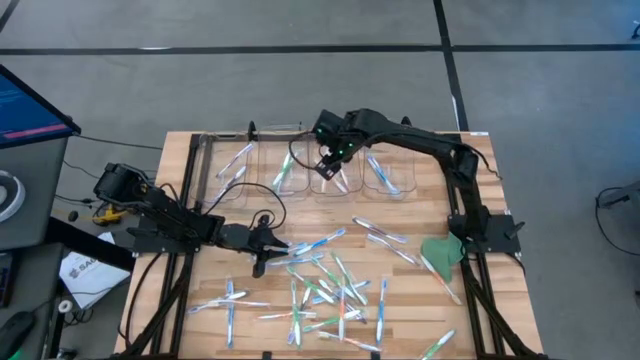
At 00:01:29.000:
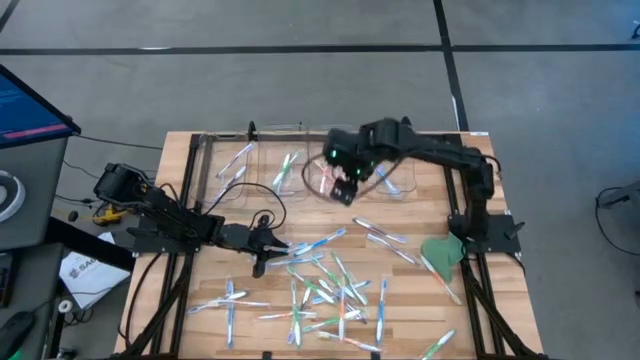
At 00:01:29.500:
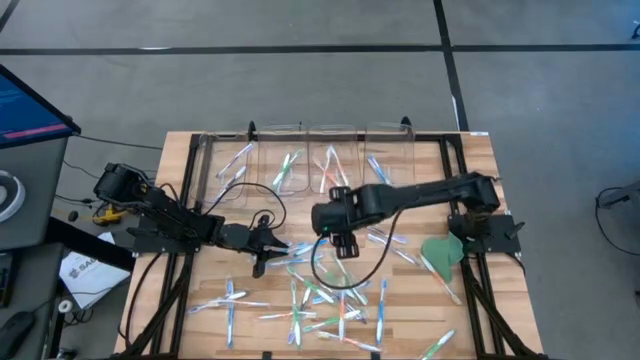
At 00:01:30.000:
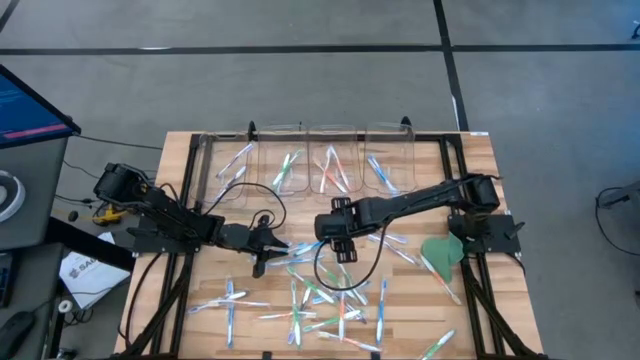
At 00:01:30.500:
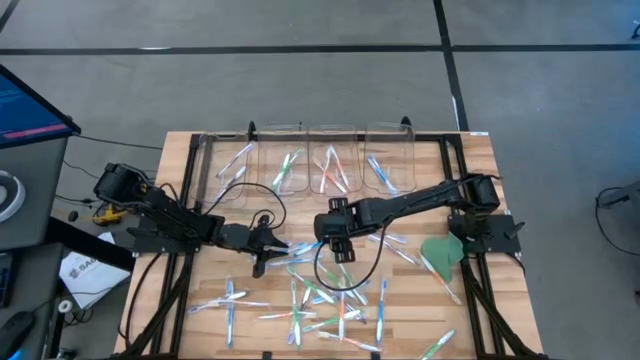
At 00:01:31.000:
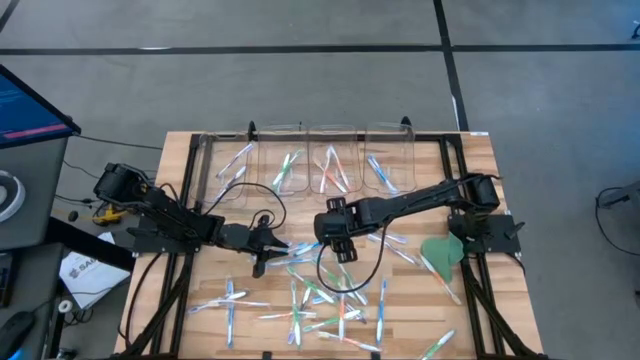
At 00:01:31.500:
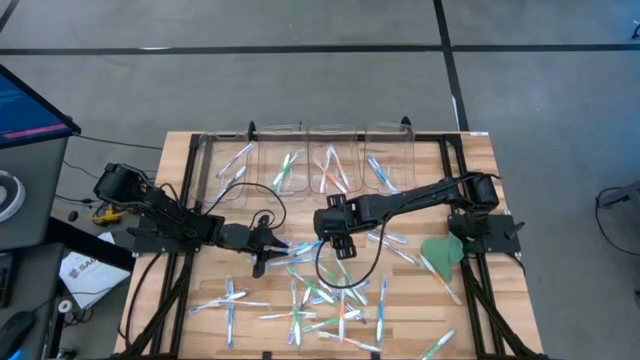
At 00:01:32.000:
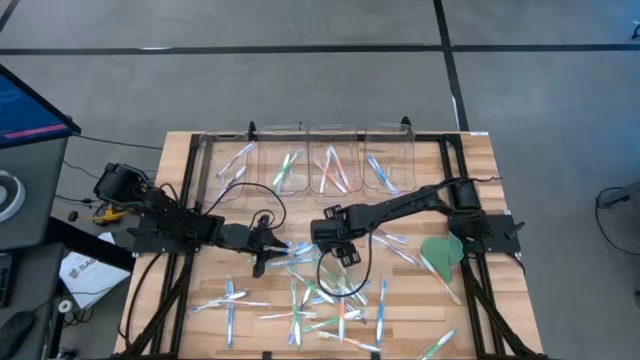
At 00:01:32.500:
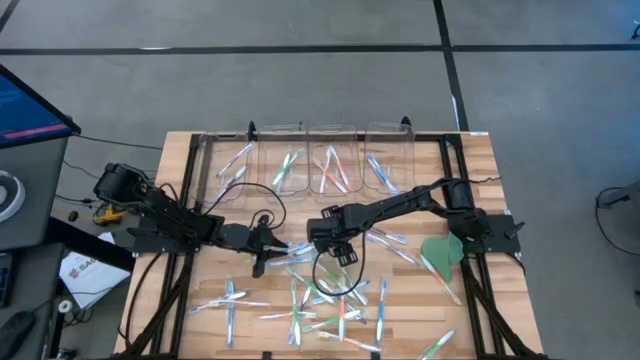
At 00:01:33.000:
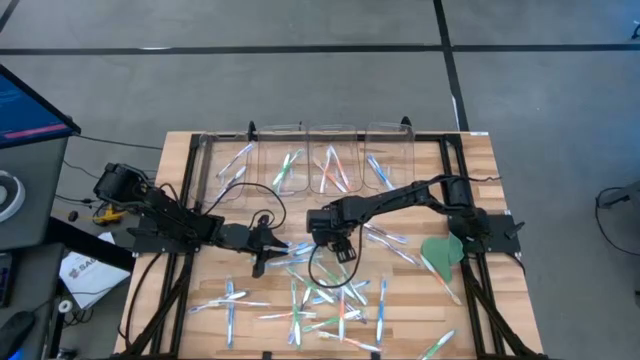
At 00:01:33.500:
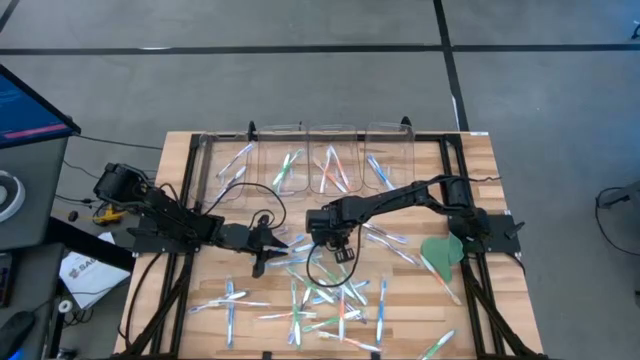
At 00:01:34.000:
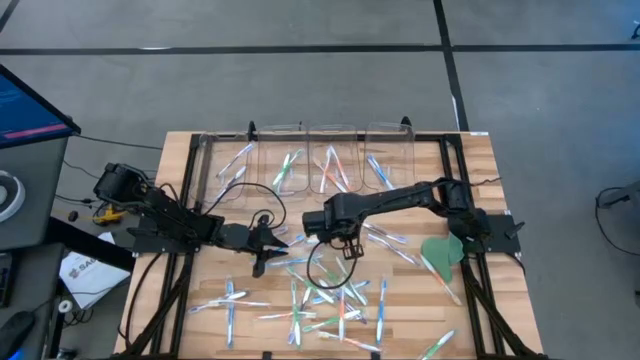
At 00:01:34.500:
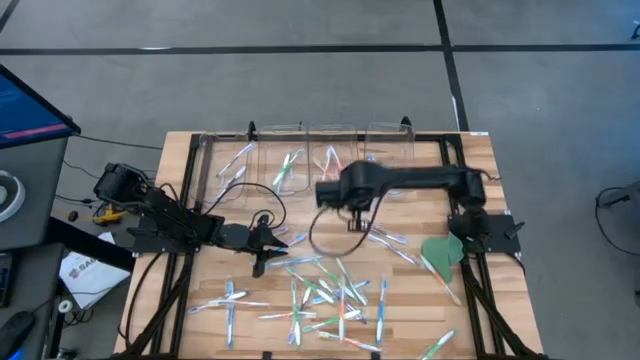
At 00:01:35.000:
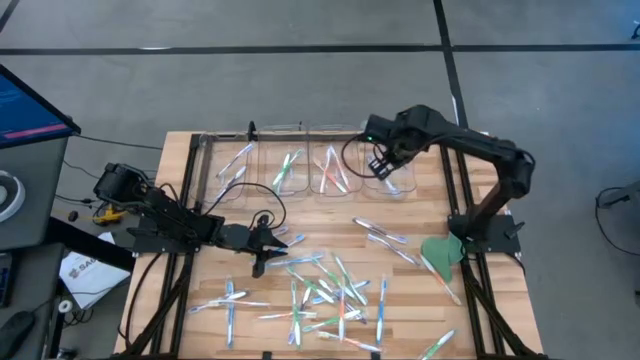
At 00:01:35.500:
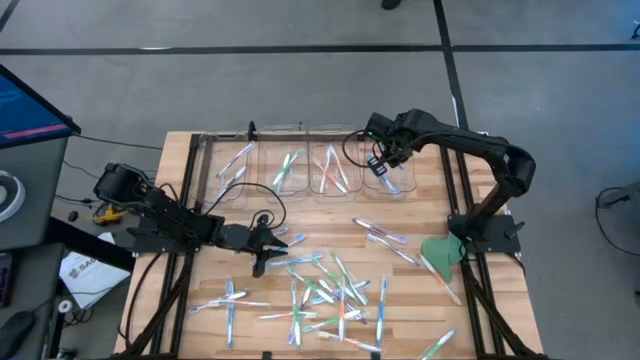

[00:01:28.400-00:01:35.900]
Task: Pick & Place Toothbrushes
Put the blue toothbrush into the right transparent bin

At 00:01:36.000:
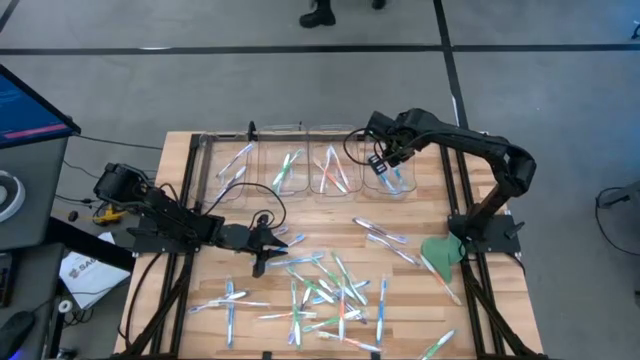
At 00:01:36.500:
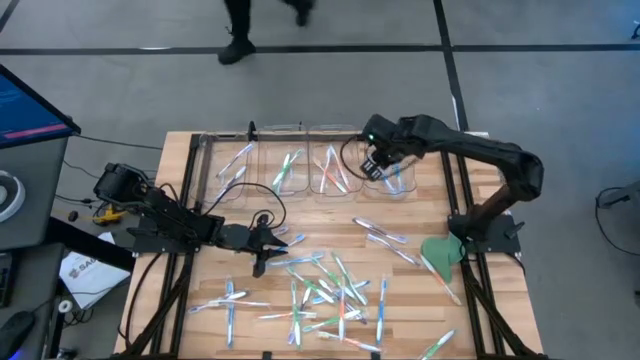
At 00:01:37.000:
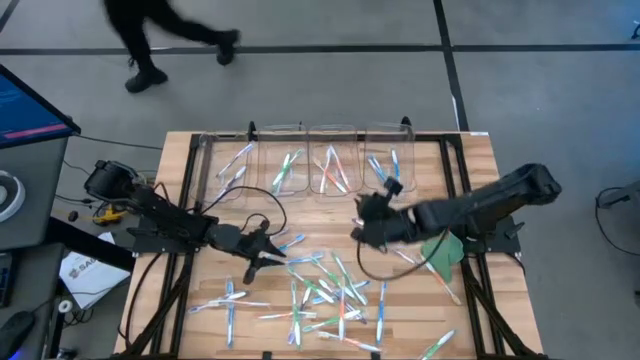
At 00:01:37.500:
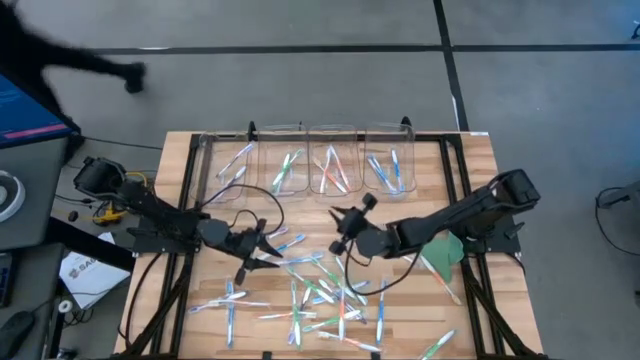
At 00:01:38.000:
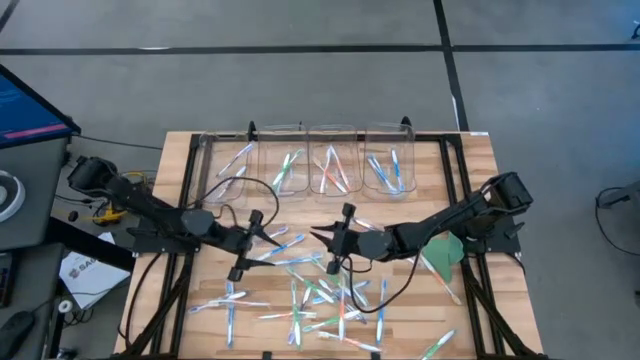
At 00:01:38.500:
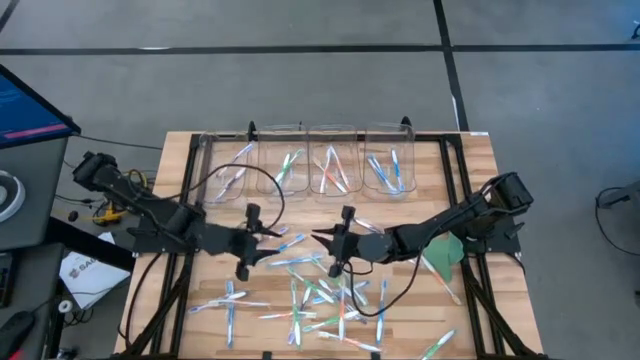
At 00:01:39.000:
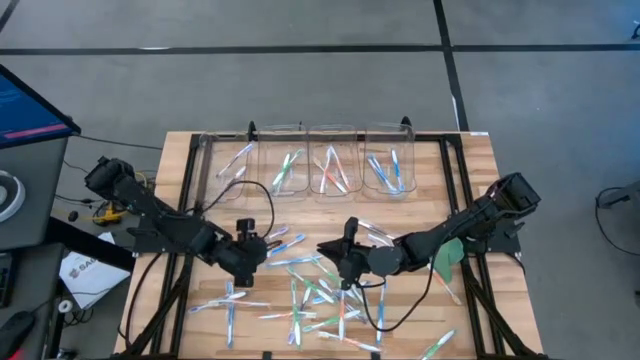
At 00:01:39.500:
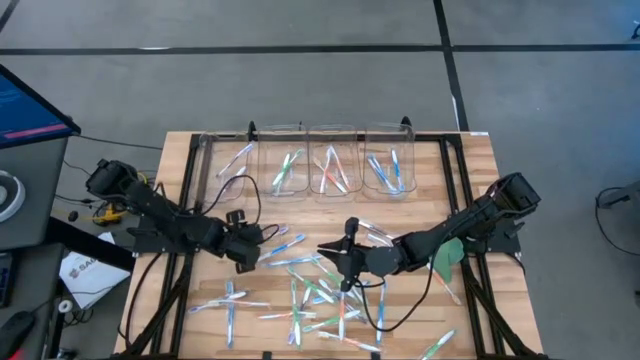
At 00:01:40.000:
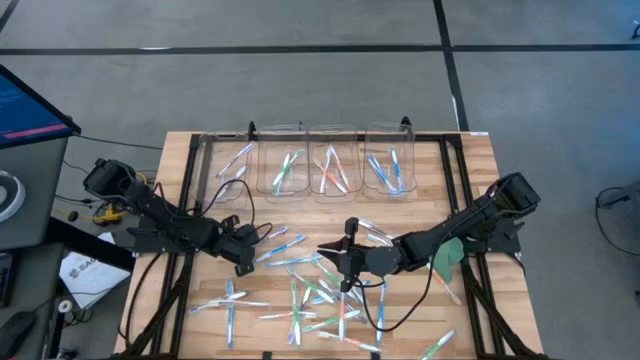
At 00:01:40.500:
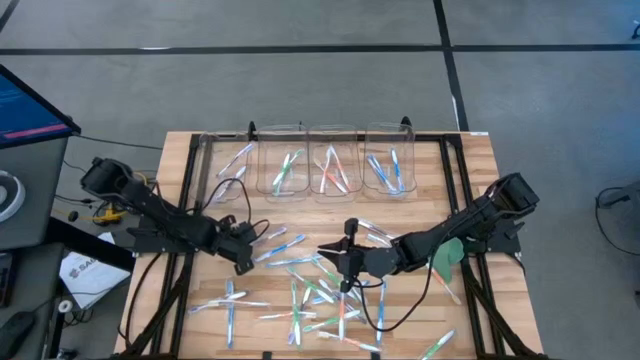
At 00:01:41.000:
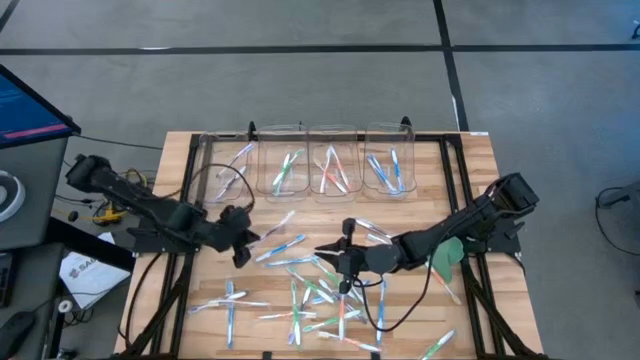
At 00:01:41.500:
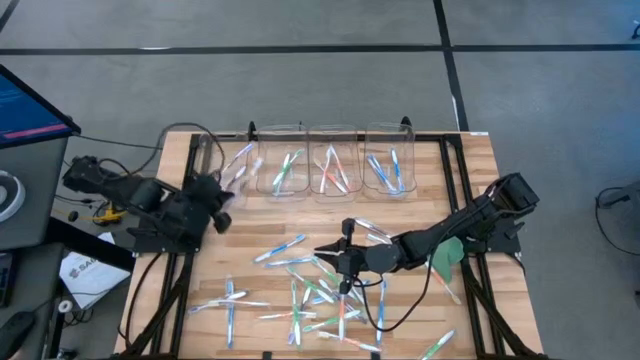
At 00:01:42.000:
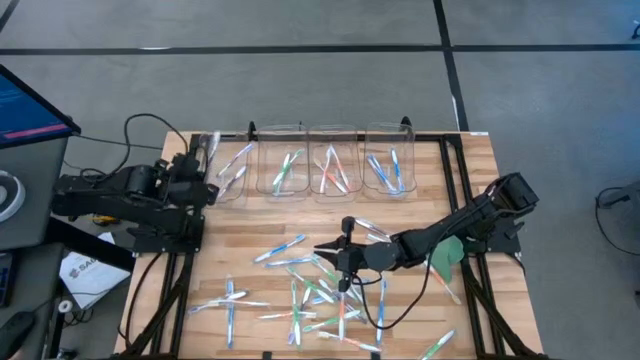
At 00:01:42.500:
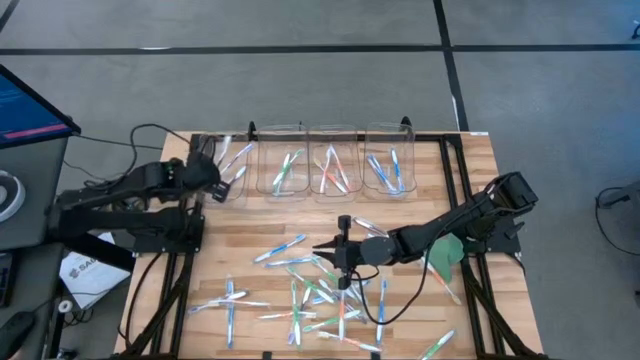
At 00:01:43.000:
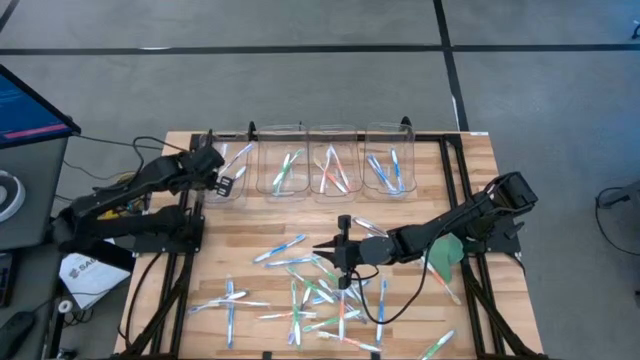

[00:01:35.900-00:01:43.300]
Put the violet toothbrush into the left transparent bin

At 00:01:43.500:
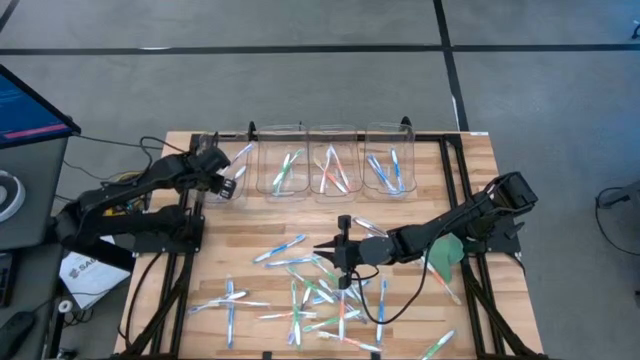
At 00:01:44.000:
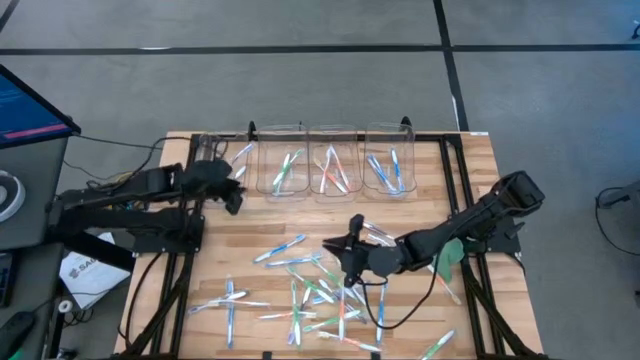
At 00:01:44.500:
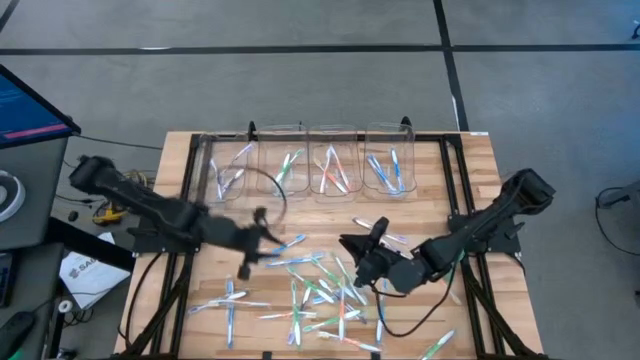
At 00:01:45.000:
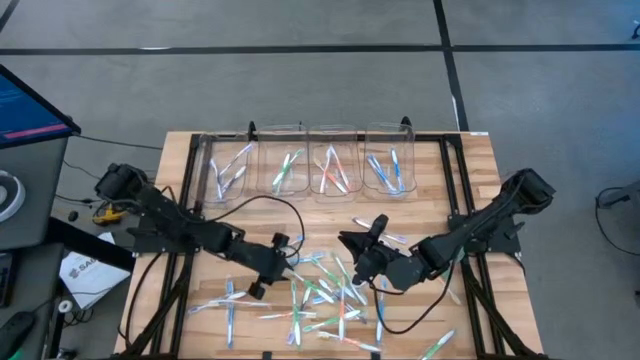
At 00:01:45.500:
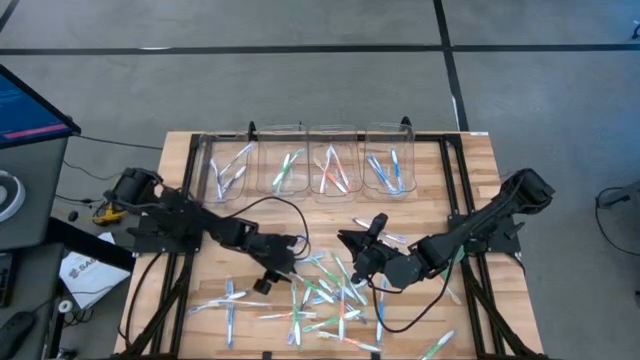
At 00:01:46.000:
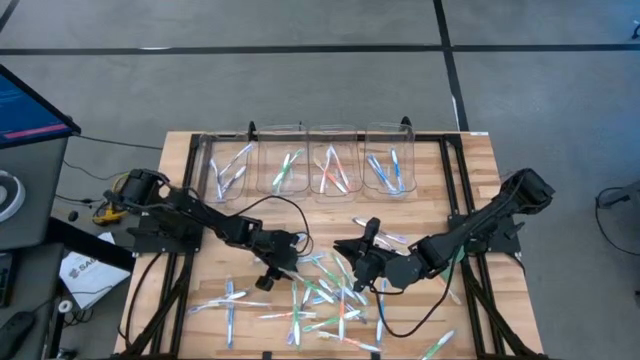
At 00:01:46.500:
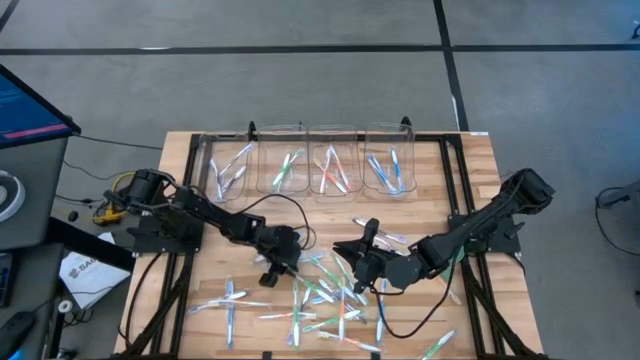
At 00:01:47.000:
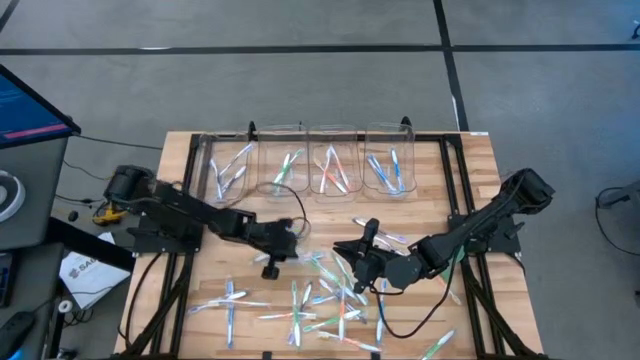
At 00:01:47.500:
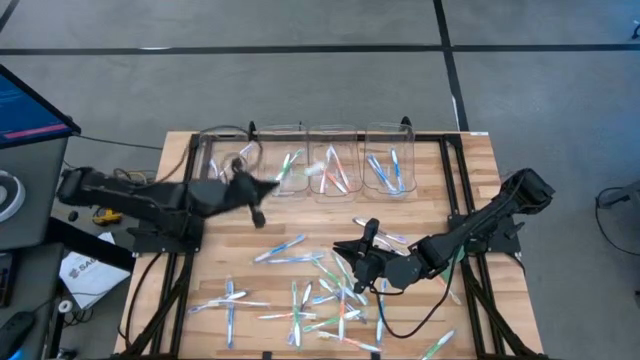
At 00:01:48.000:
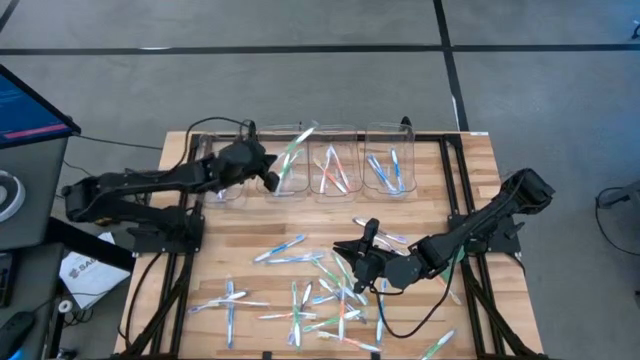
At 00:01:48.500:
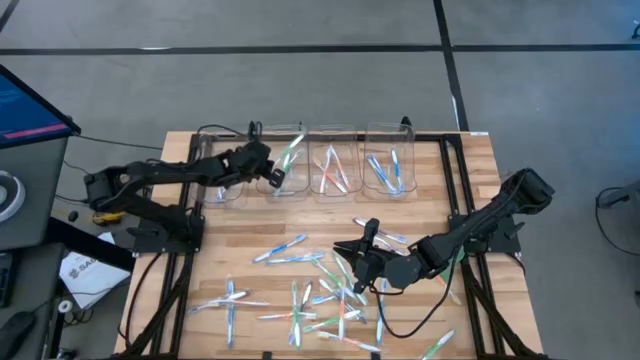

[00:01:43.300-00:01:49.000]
Put the green toothbrush into the middle left transparent bin

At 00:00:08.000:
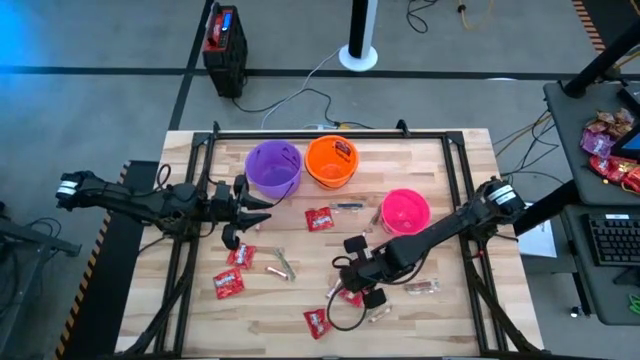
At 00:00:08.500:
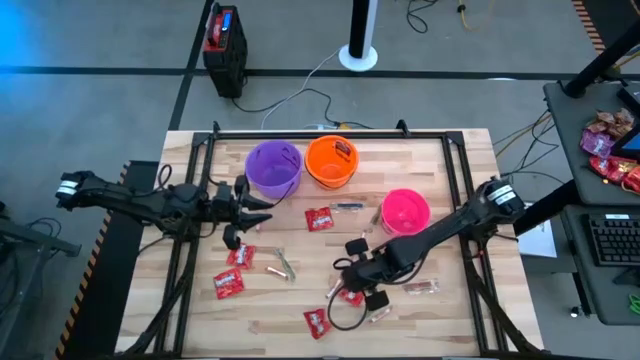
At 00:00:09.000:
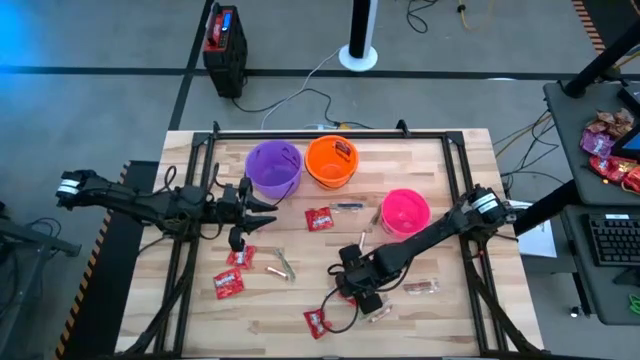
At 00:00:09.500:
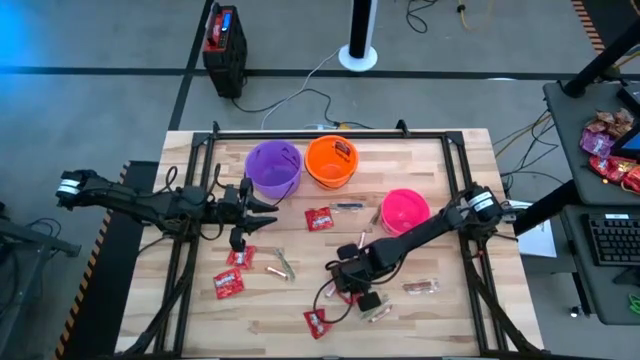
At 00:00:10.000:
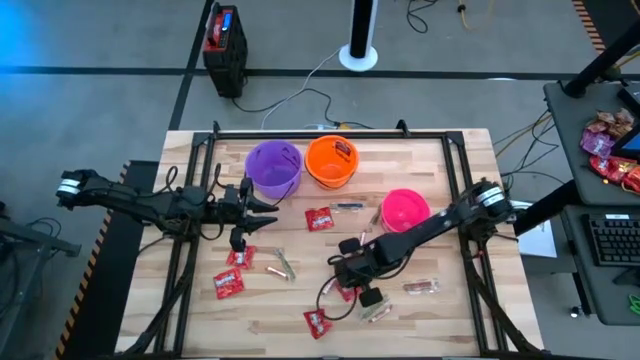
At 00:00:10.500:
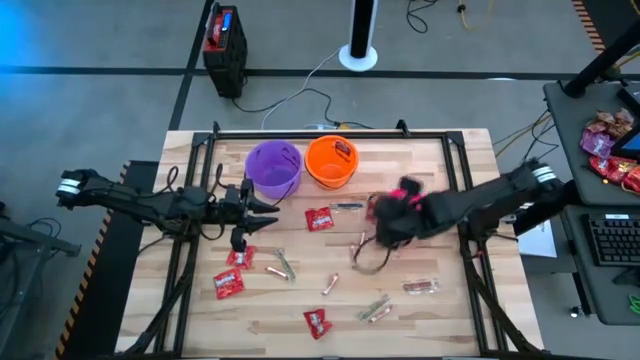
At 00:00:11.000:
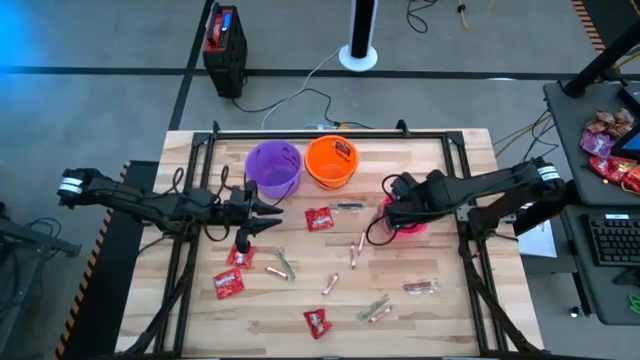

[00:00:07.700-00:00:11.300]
Task: Sort candy by brand, put in halloween buckets
Put the red candy into the pink bucket
